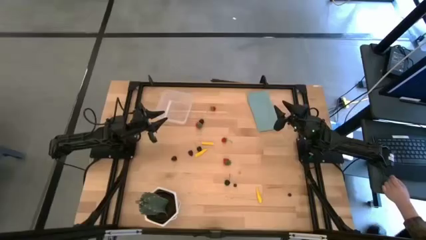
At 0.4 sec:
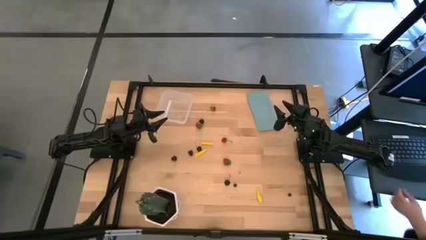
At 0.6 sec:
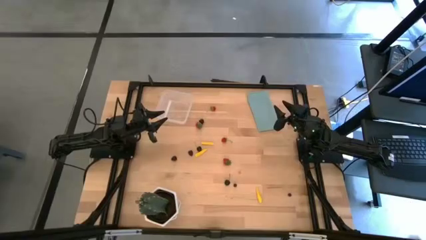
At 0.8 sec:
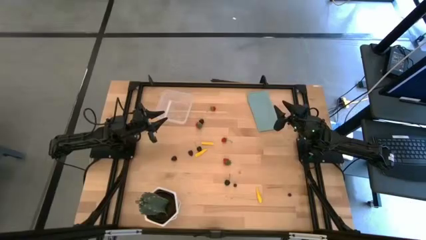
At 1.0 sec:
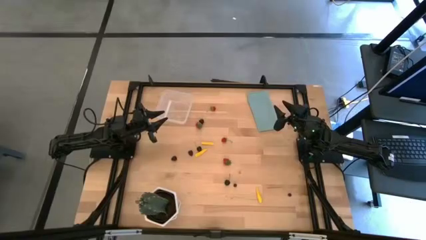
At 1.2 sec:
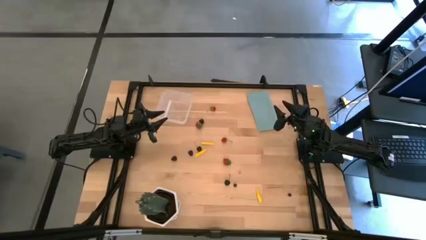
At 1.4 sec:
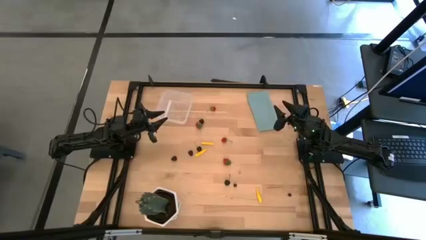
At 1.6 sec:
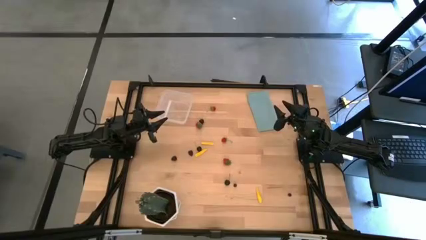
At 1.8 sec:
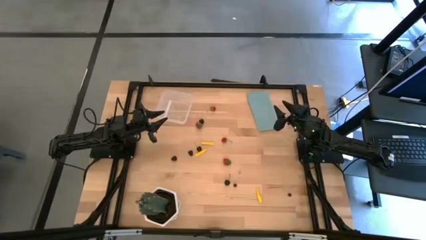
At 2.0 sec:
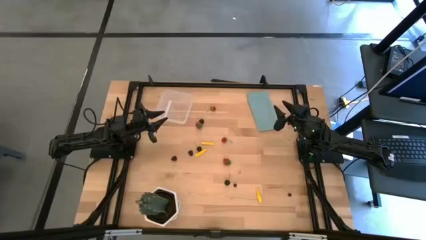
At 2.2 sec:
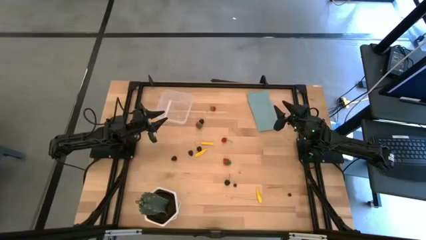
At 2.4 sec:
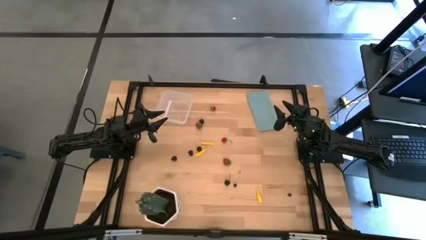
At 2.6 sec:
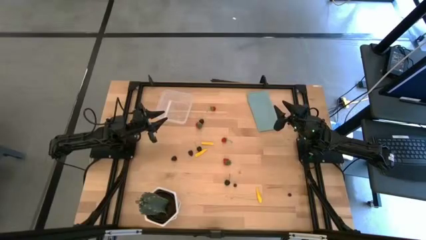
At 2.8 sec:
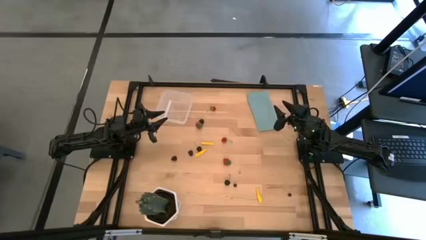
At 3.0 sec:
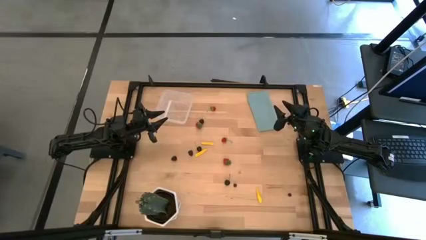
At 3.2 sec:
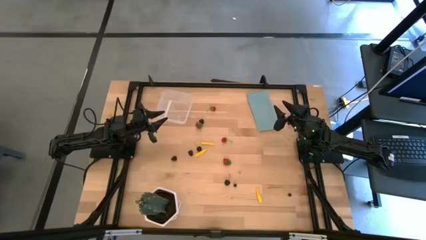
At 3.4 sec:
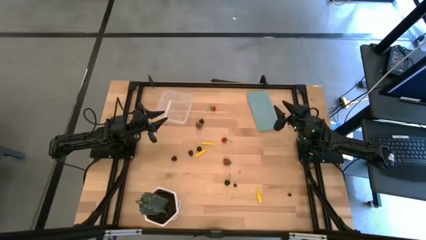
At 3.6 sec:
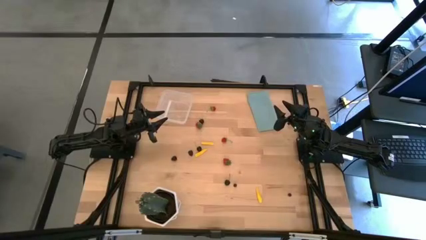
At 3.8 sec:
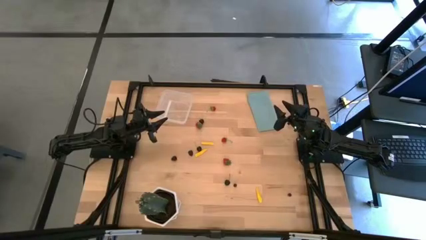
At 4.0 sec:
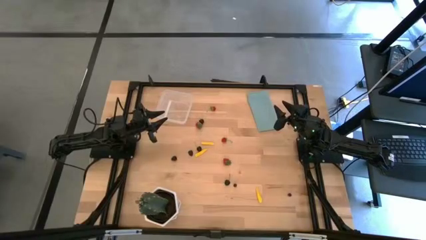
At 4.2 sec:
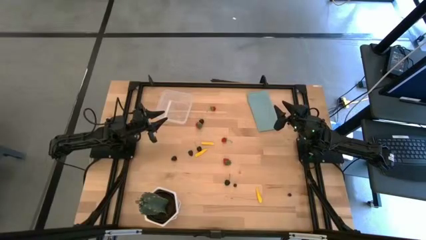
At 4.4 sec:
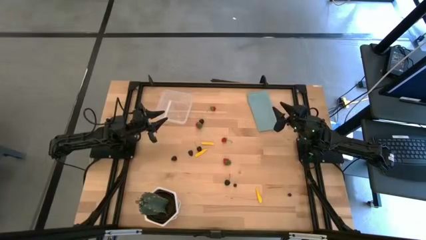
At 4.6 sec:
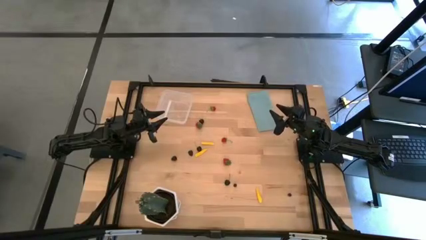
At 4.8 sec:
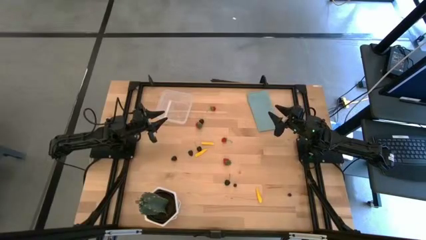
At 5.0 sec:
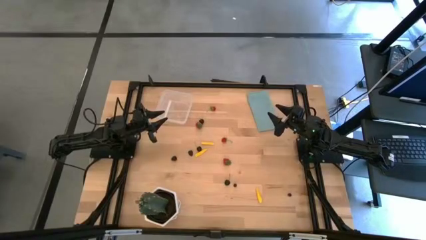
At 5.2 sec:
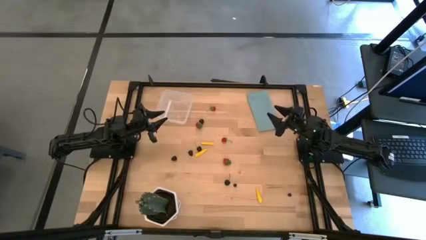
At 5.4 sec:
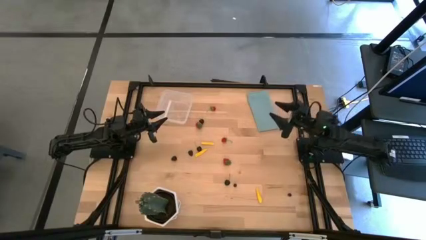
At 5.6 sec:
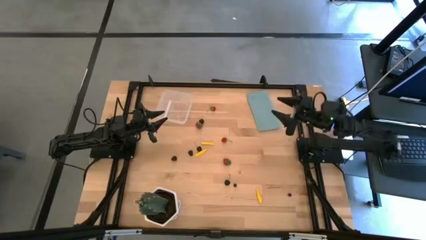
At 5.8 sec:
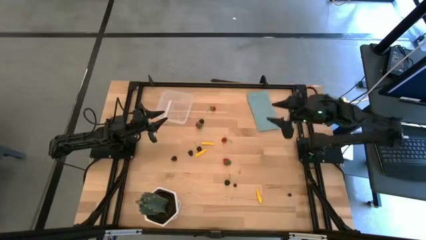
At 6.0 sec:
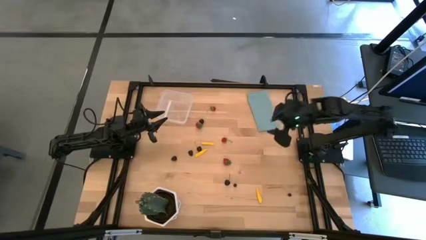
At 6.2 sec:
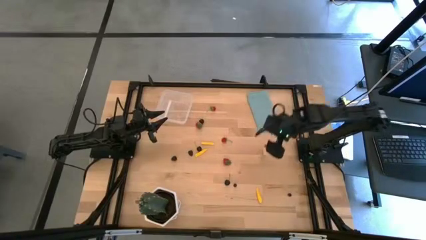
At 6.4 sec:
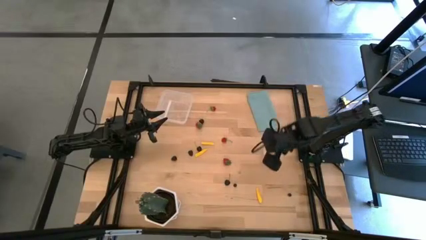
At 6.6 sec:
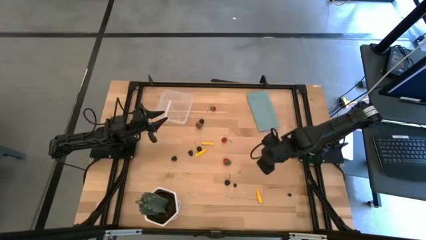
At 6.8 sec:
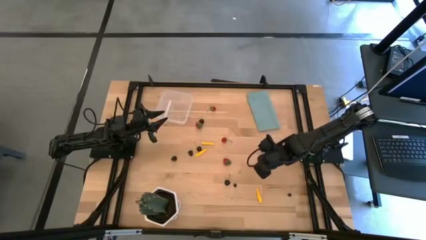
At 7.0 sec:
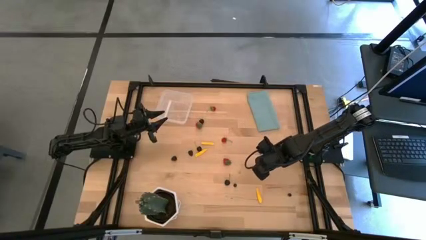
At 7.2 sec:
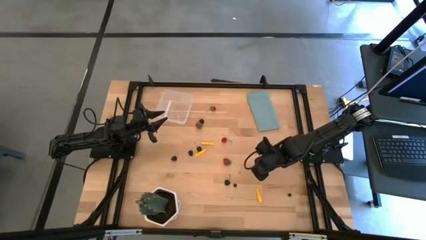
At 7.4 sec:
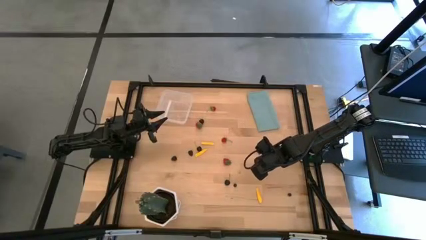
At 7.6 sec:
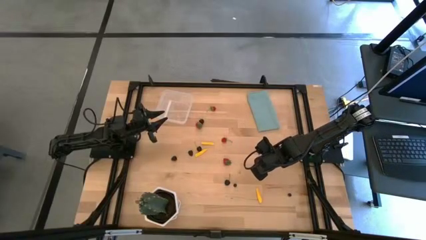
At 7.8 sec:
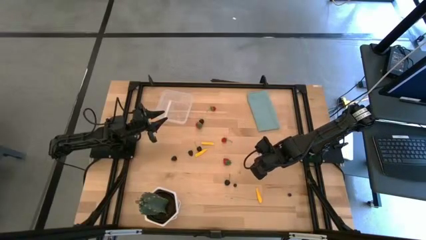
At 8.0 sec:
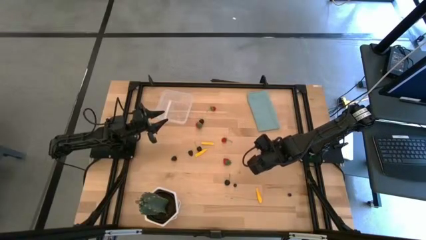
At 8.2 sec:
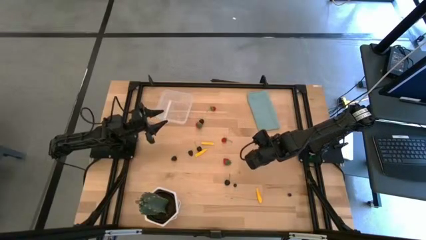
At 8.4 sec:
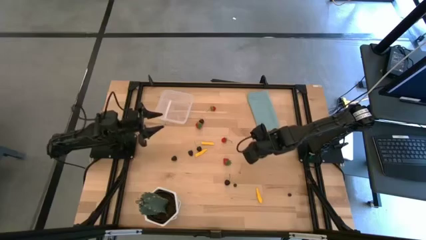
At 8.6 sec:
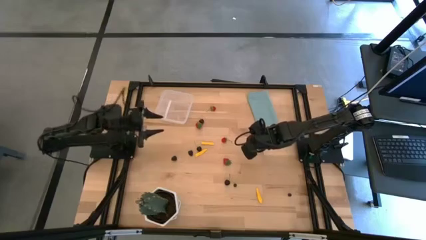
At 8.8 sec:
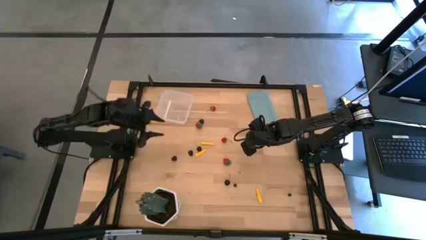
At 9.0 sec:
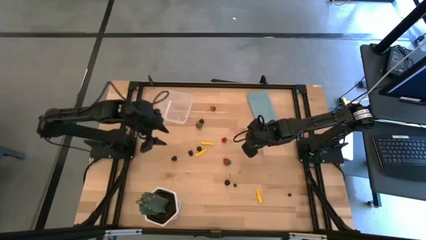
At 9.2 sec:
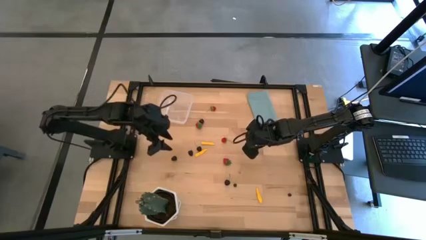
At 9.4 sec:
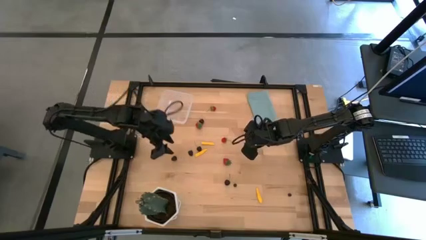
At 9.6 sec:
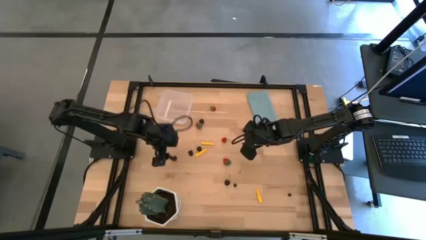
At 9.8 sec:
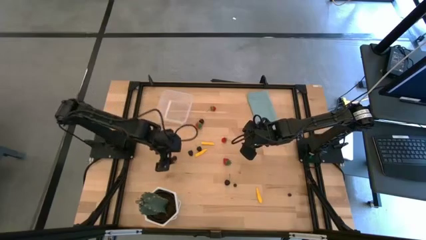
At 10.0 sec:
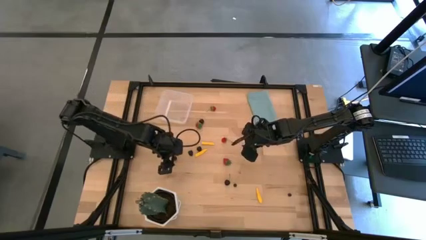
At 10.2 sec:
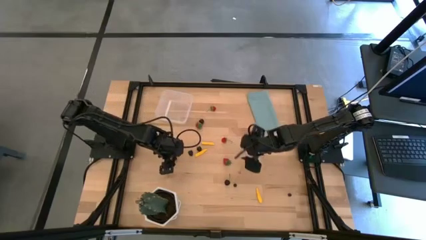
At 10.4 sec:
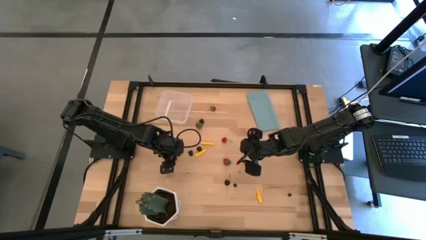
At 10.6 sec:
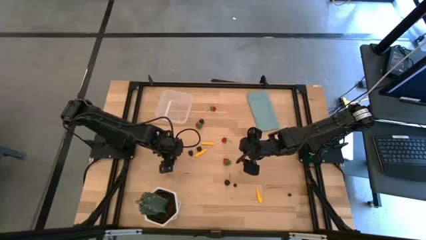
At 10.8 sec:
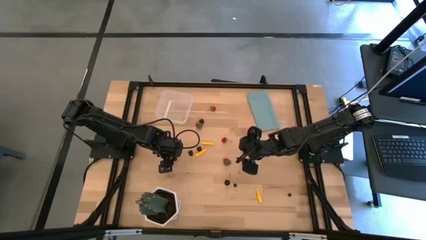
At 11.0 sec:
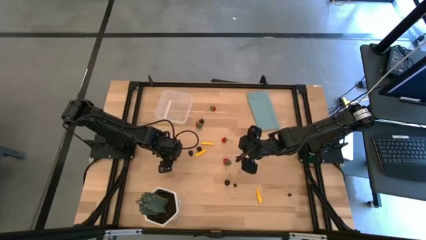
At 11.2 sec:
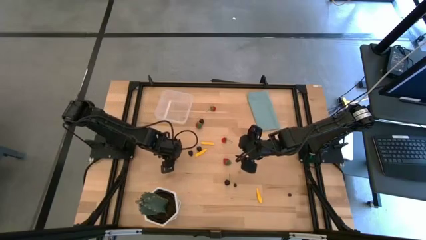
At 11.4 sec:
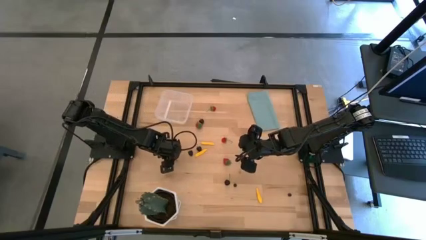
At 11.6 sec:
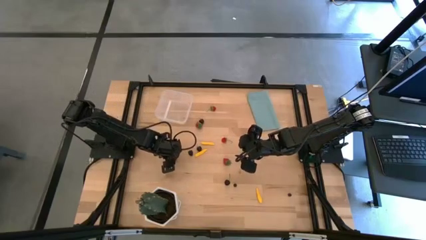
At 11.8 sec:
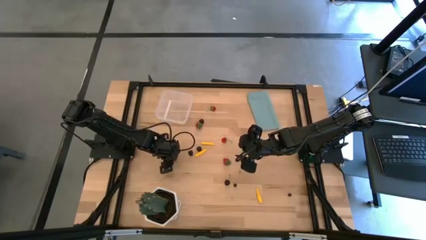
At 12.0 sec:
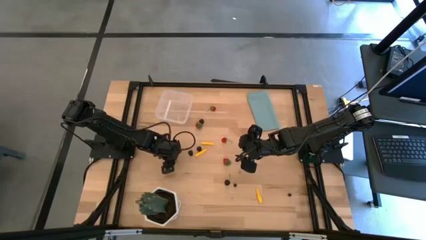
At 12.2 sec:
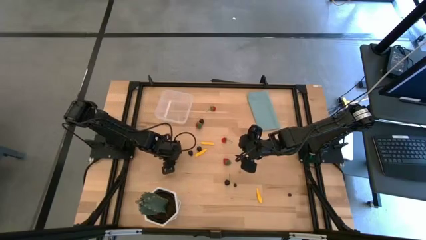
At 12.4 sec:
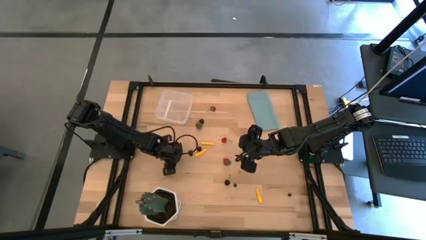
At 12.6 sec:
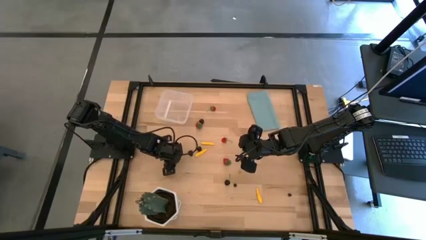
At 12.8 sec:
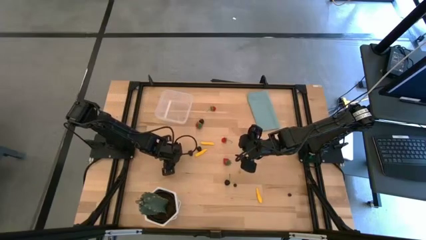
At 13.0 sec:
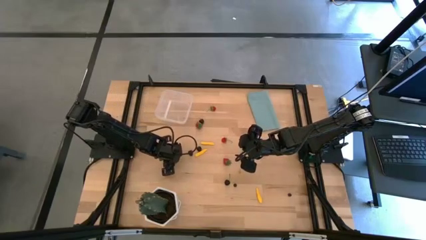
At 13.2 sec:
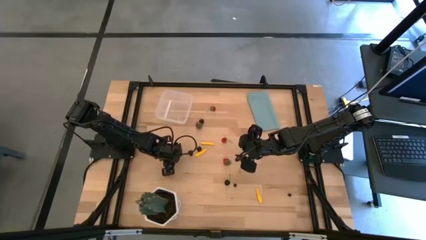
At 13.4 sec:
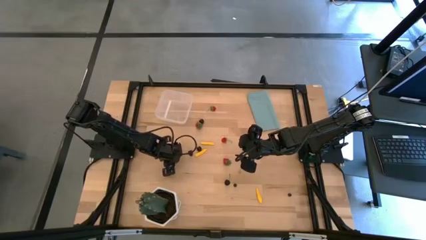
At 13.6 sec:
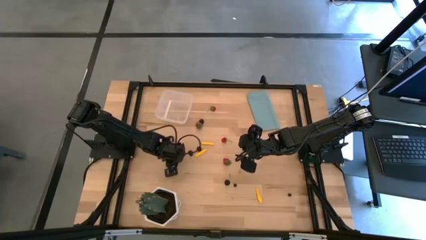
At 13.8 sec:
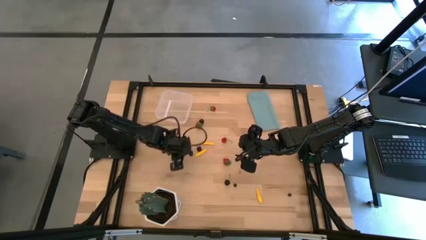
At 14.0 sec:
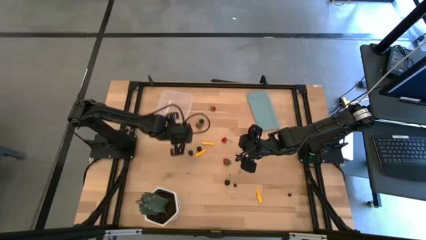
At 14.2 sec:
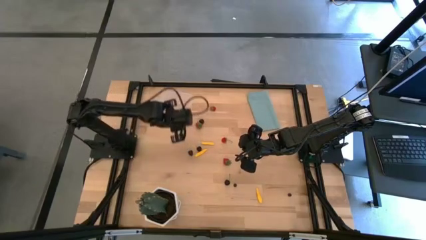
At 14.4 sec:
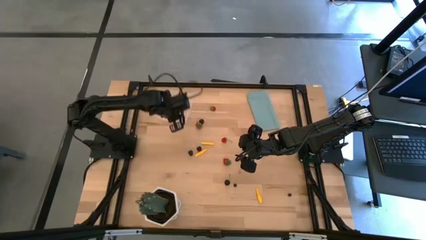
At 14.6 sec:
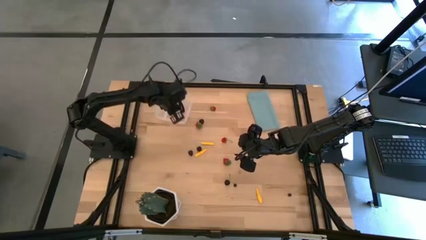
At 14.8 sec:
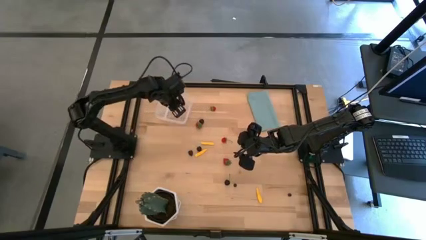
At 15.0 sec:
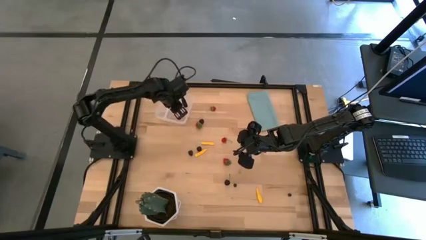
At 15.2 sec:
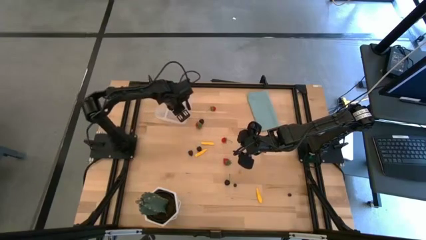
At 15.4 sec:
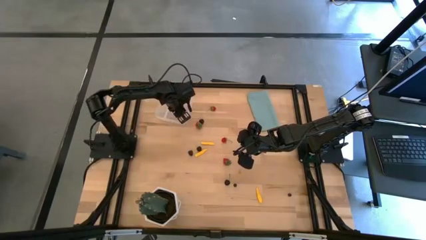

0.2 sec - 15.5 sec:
Task: Pick and placing Produce into tupperware
Put the blackberry into the transparent bin
